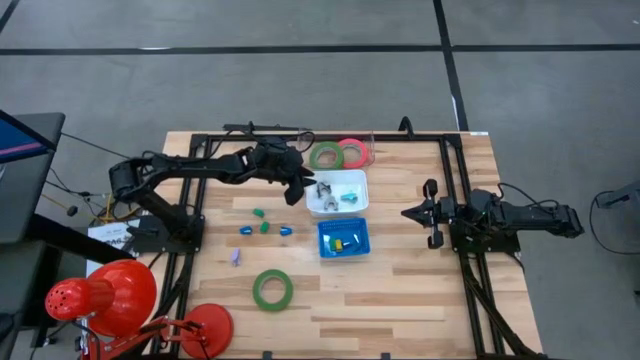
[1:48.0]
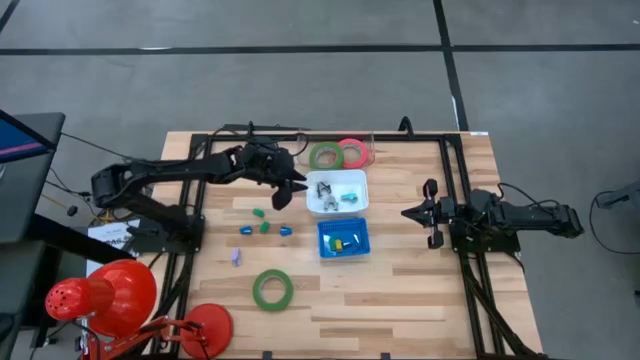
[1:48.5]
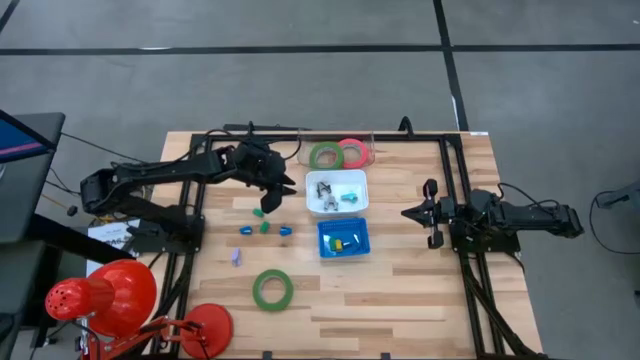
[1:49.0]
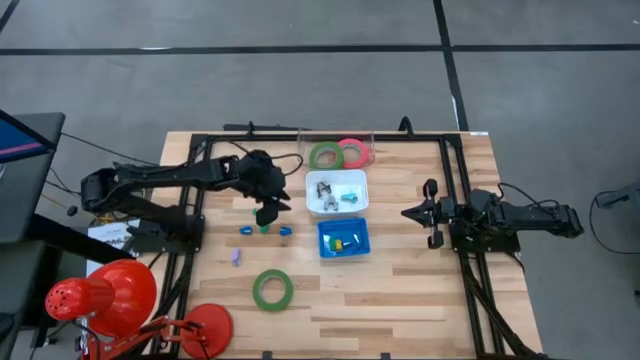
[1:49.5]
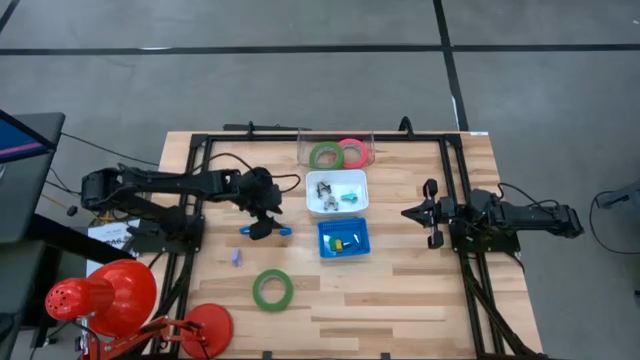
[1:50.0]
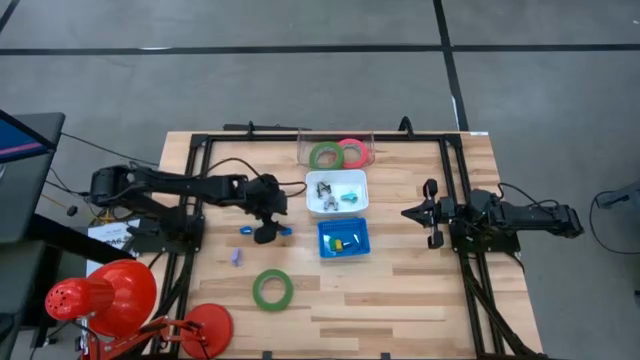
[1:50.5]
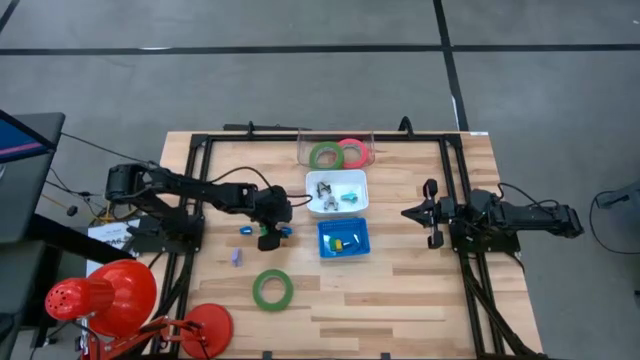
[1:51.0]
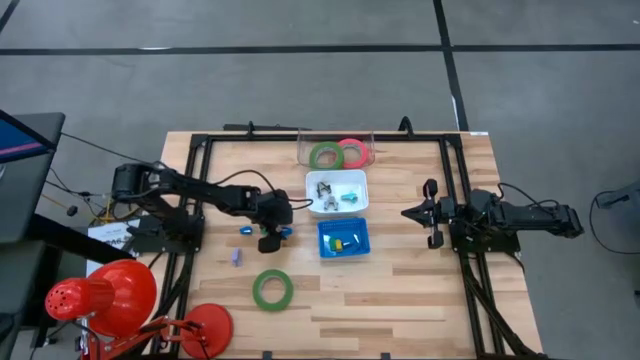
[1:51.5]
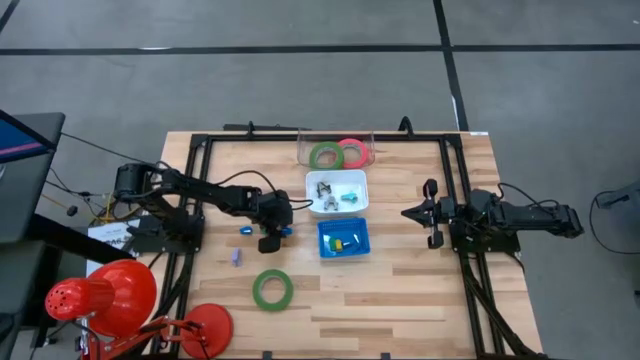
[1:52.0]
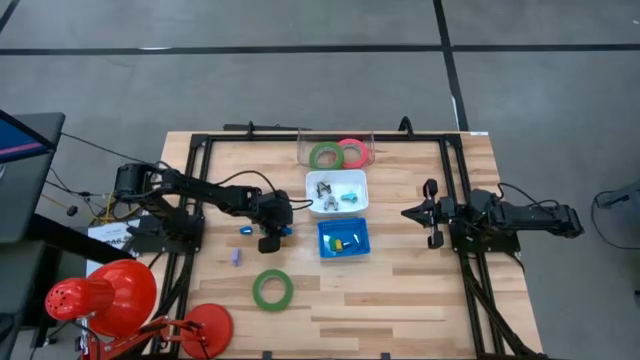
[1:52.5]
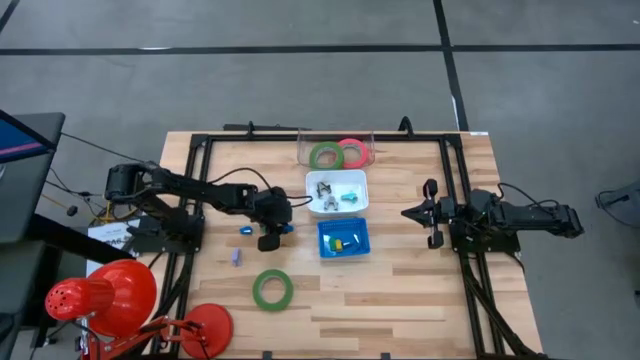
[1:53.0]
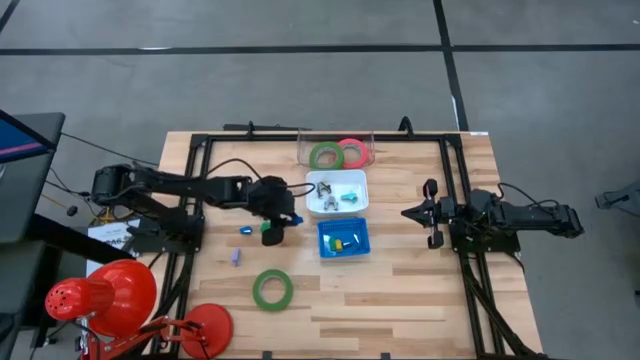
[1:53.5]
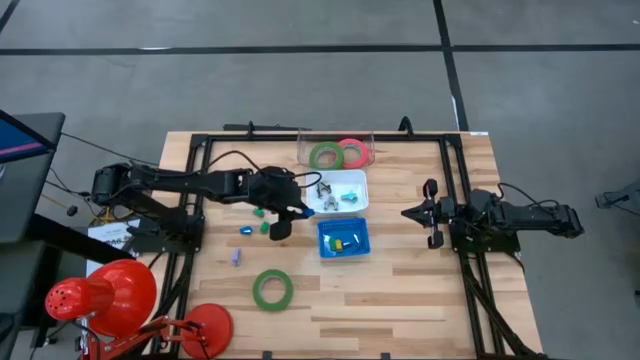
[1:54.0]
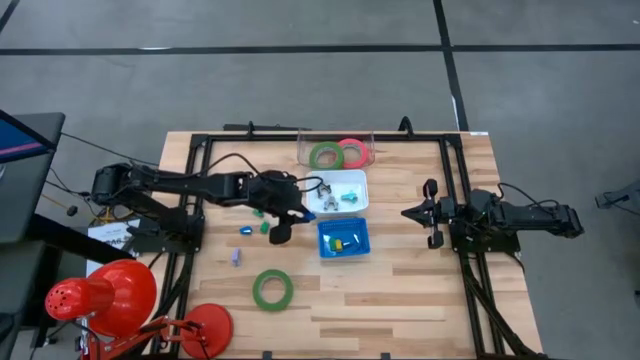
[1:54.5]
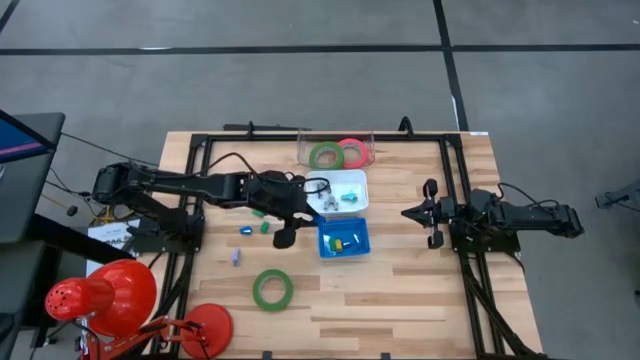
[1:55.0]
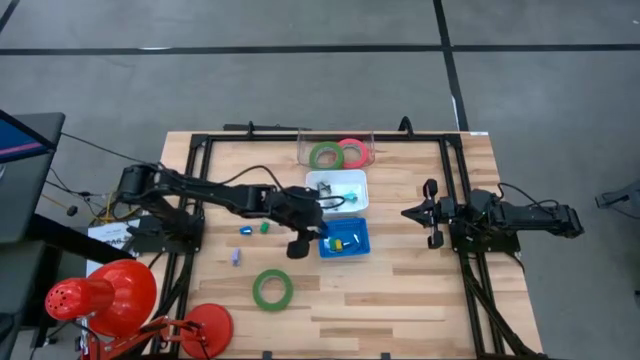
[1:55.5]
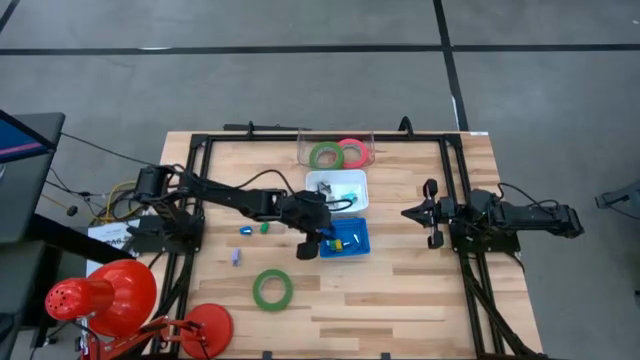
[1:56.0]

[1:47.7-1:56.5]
Task: Pick and place Stapler, Stapler remover, tape
Put the right blue stapler into the blue bin

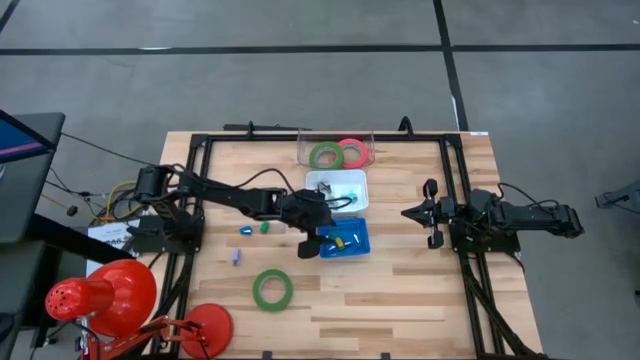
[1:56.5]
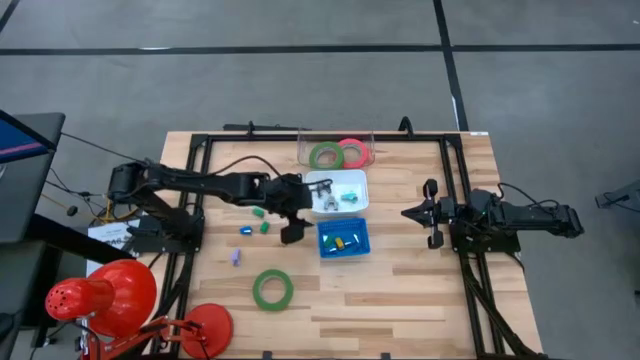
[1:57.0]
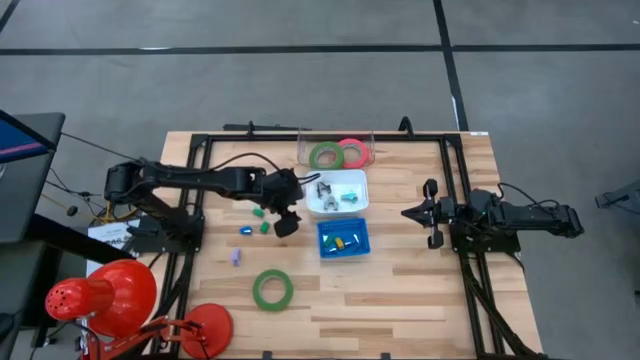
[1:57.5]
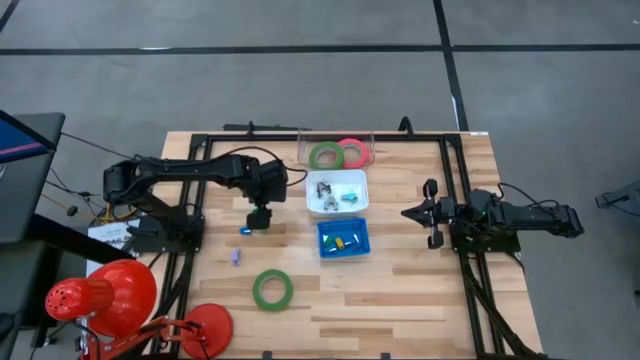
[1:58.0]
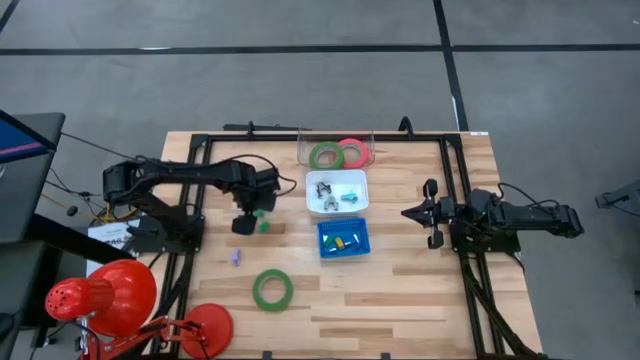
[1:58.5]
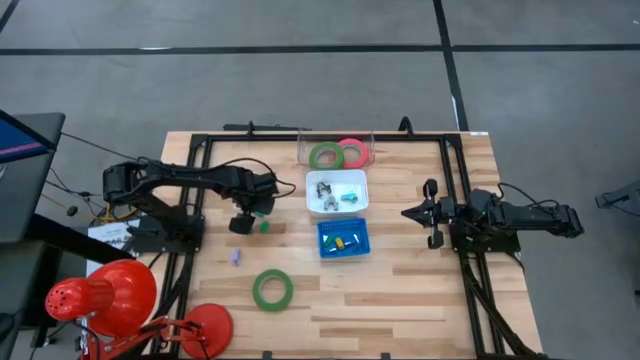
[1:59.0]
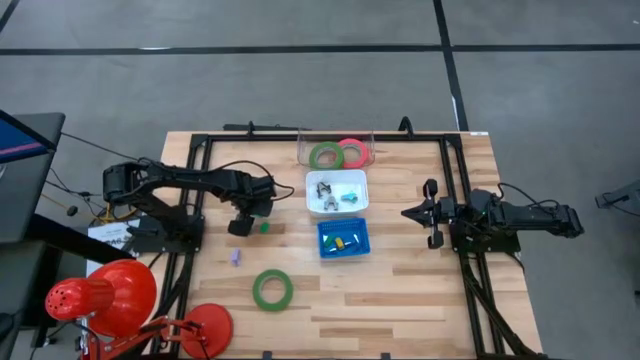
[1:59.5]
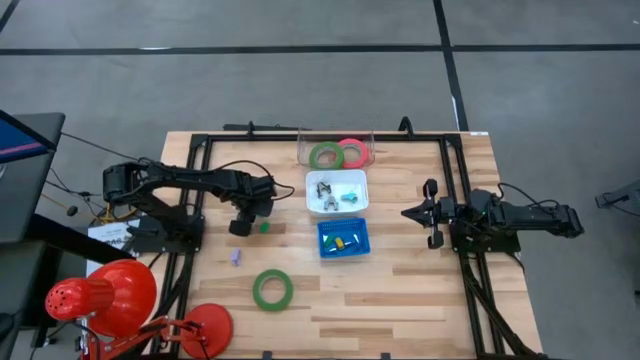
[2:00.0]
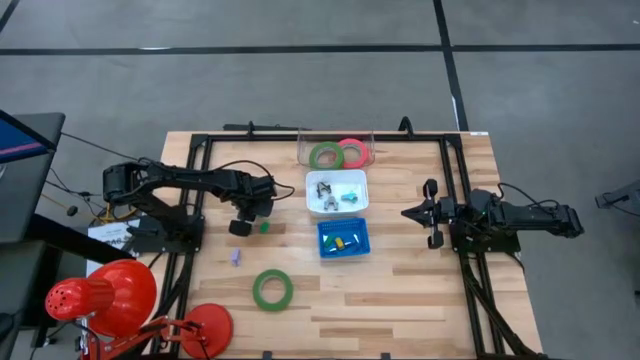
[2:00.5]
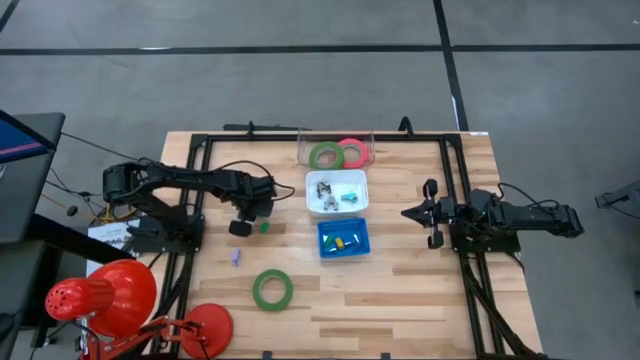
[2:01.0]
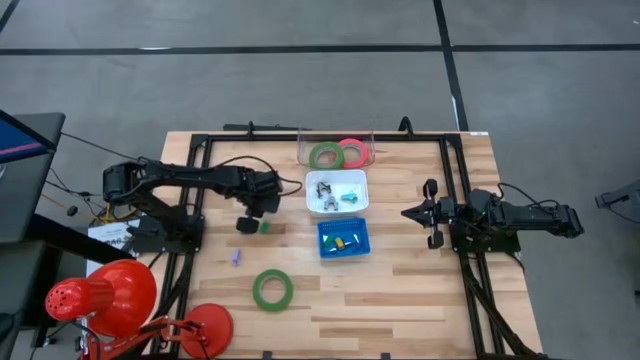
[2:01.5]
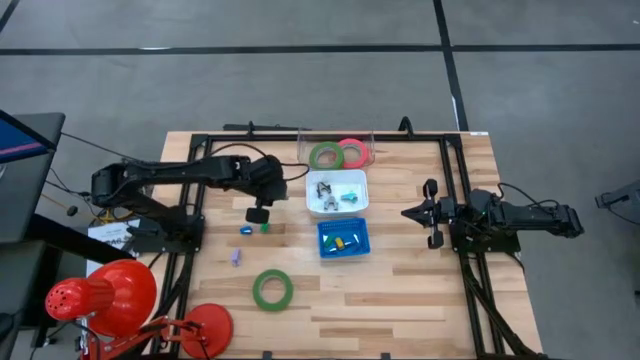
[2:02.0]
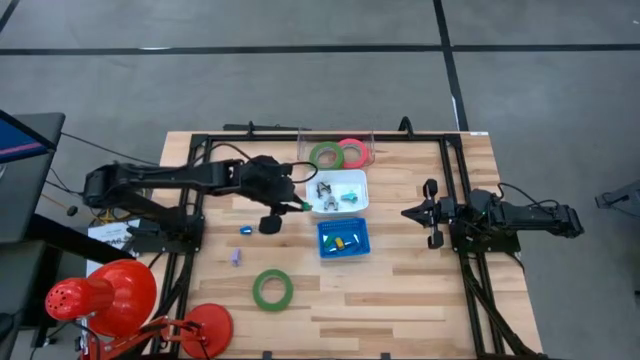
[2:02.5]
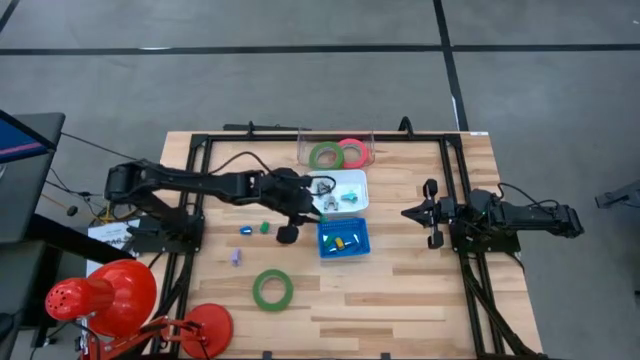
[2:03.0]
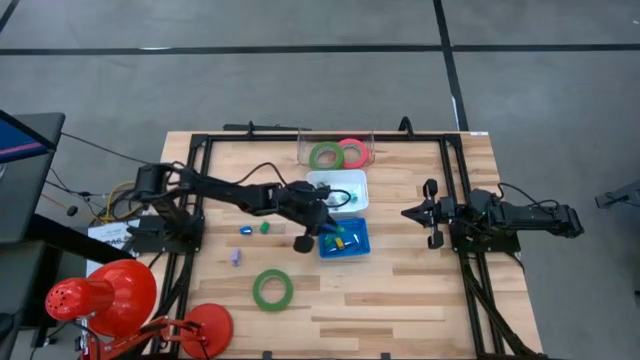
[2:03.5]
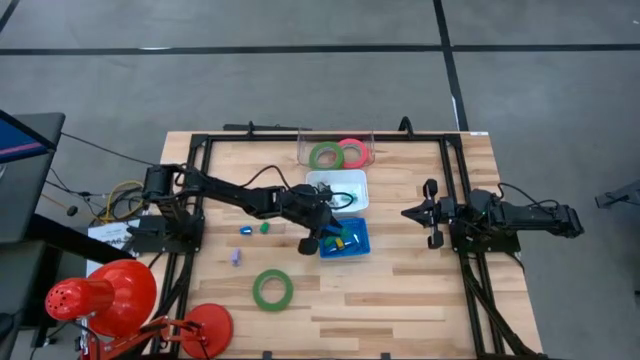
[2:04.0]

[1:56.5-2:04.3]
Put the top green stapler into the blue bin

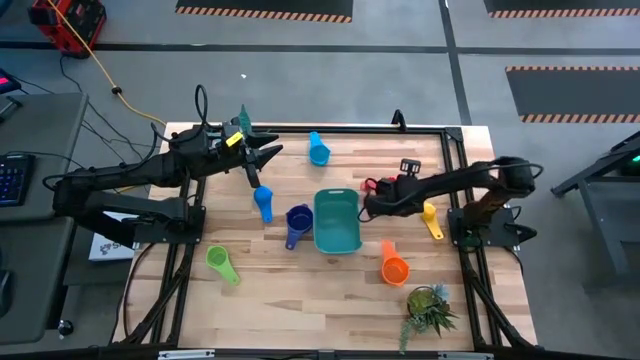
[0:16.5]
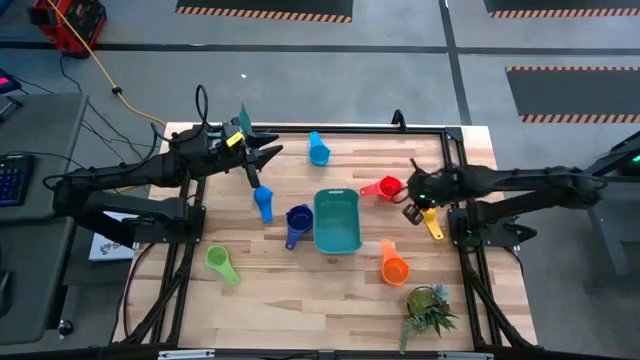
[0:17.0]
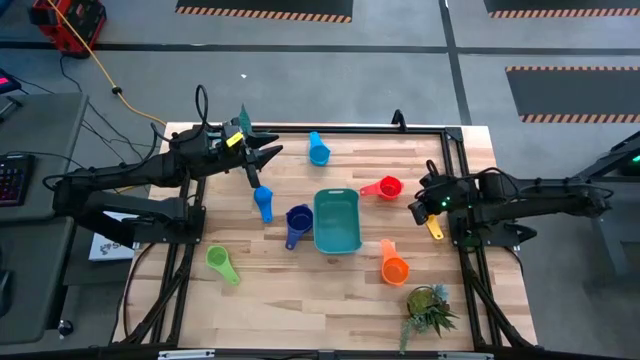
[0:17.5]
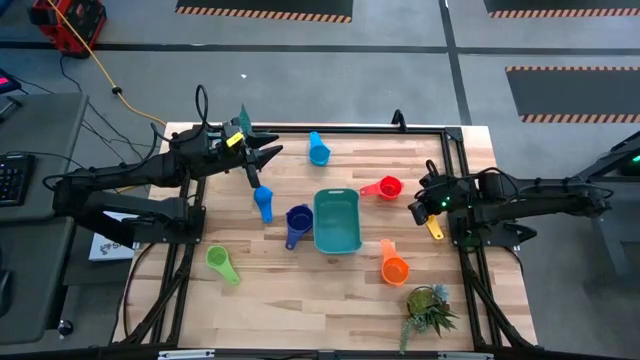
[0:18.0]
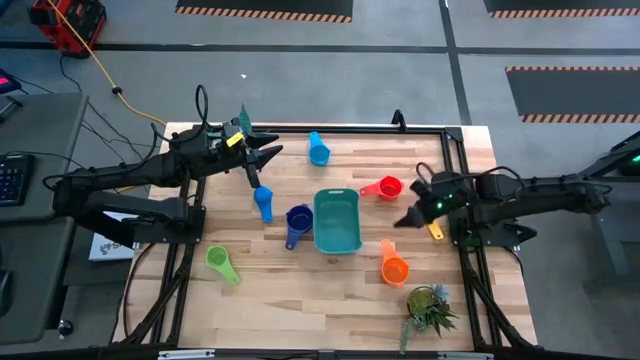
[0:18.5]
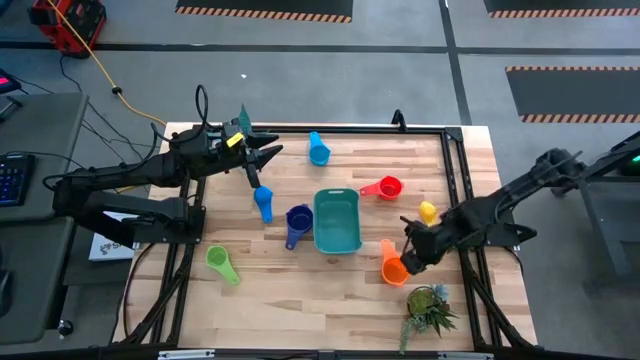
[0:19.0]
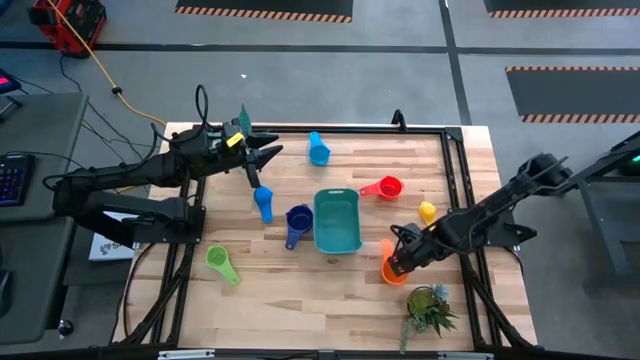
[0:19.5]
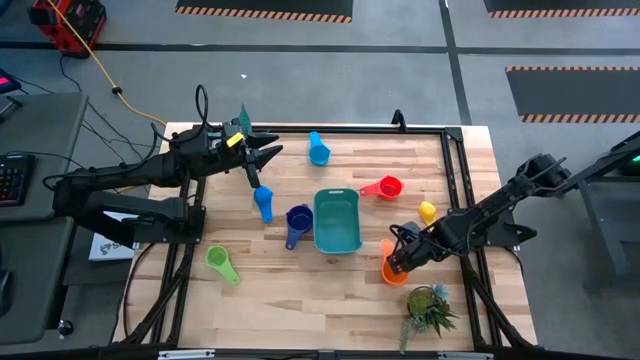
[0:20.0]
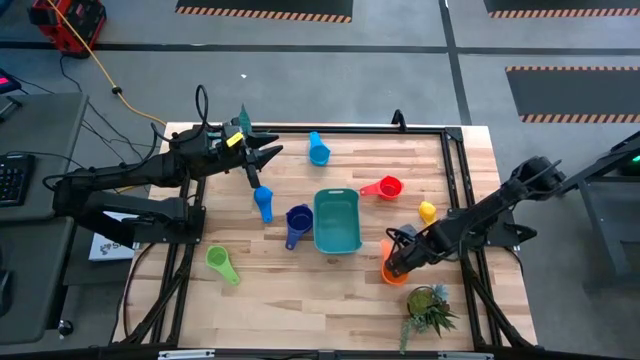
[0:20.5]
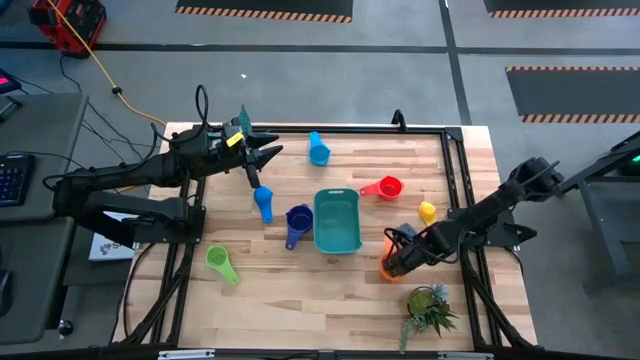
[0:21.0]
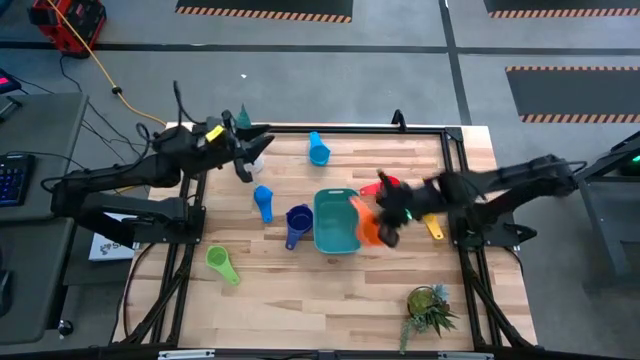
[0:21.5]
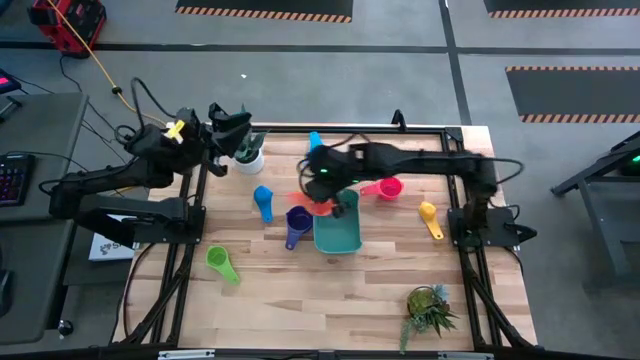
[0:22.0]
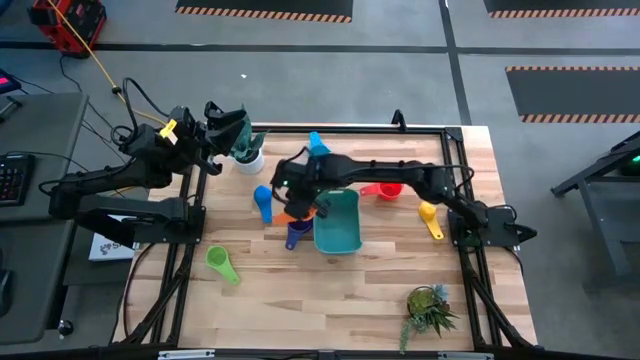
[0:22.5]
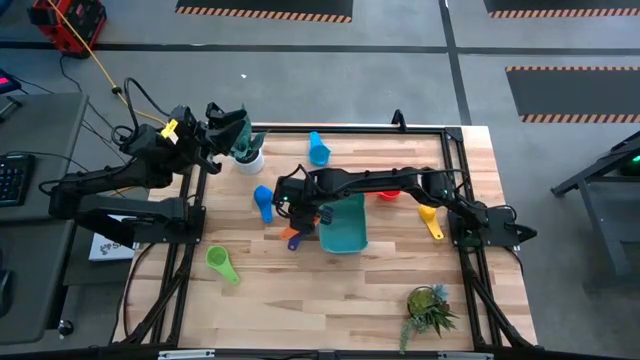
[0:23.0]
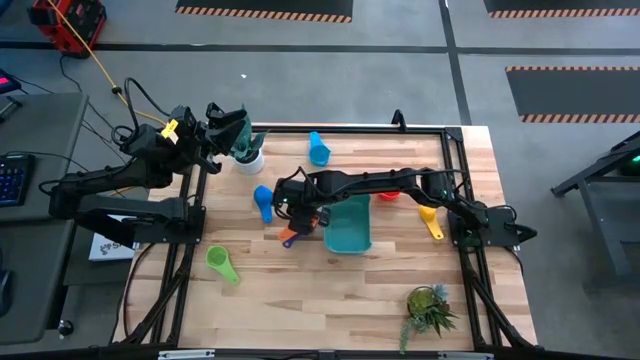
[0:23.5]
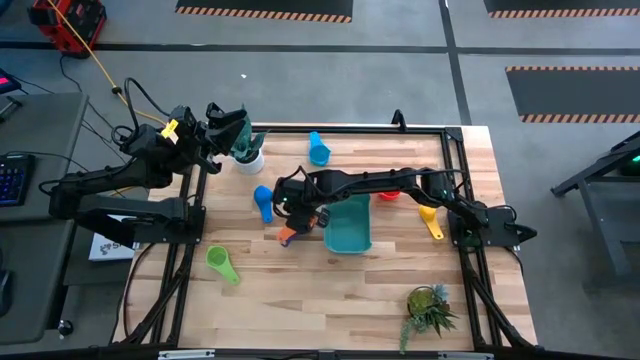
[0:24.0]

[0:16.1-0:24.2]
Task: Nest measuring cups in basket
Stack the orange measuring cup on top of the dark blue measuring cup
